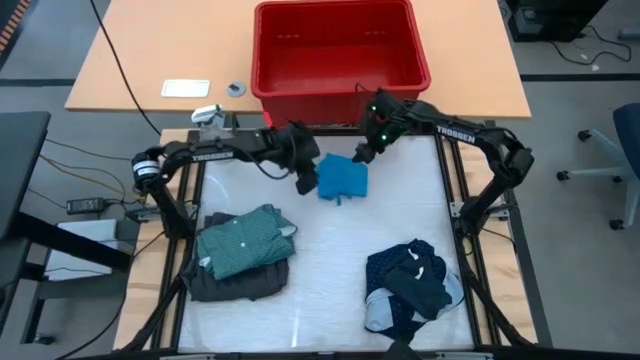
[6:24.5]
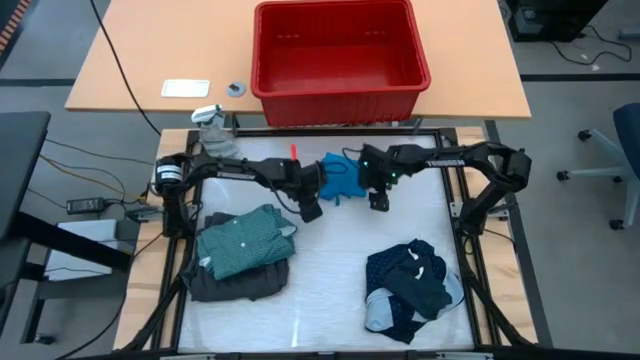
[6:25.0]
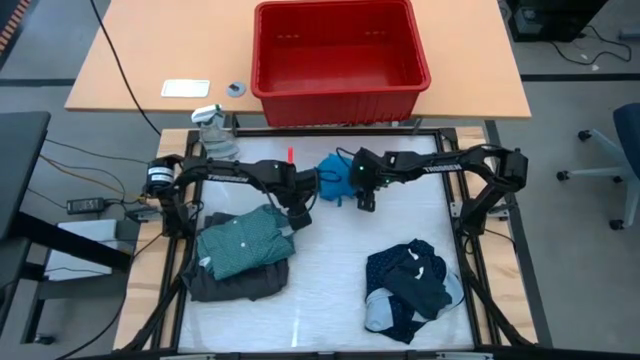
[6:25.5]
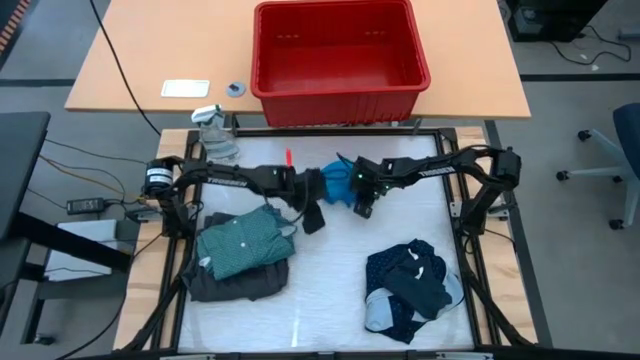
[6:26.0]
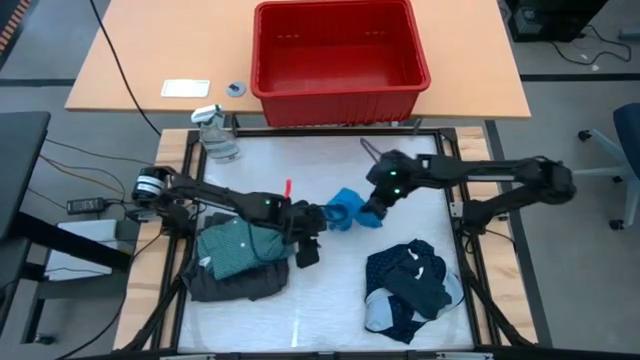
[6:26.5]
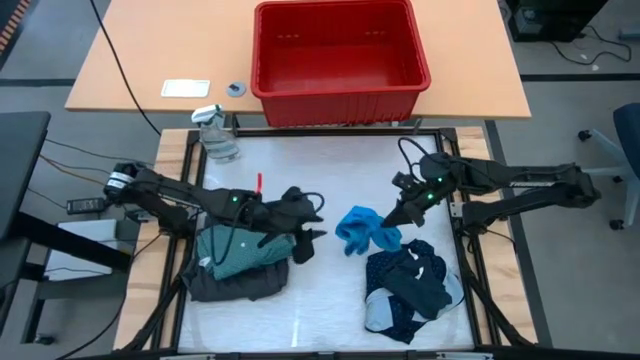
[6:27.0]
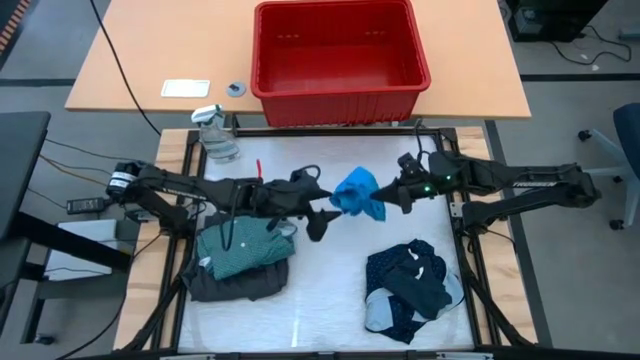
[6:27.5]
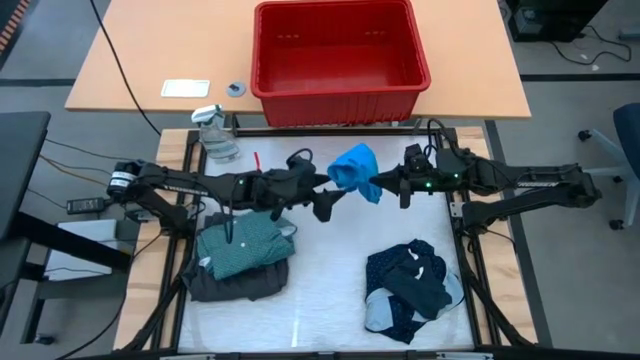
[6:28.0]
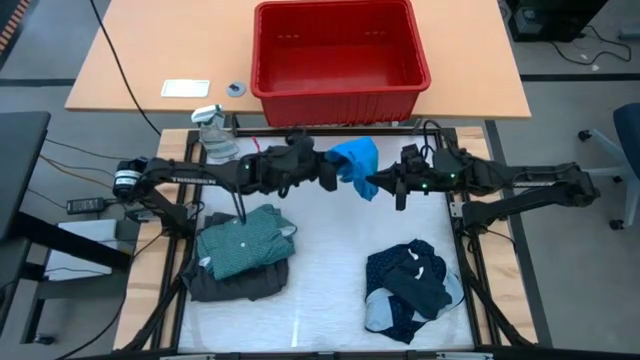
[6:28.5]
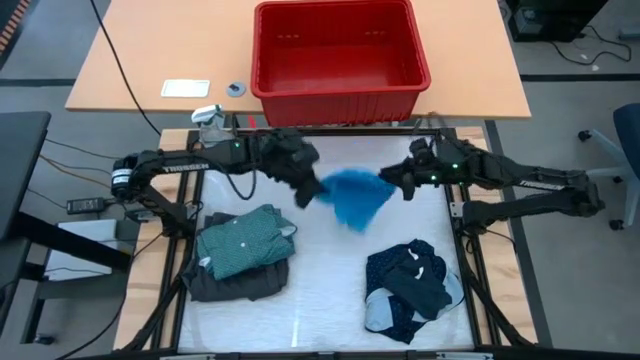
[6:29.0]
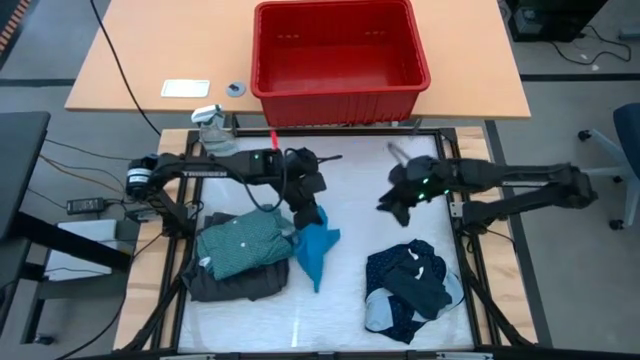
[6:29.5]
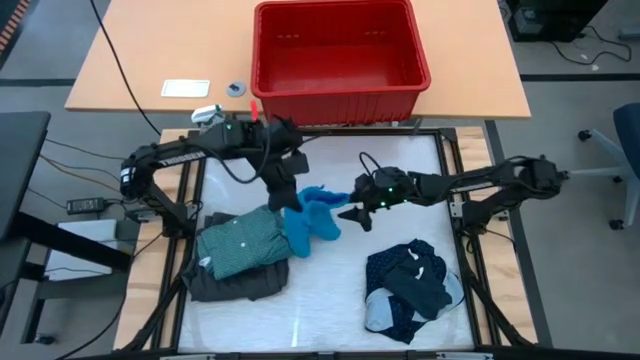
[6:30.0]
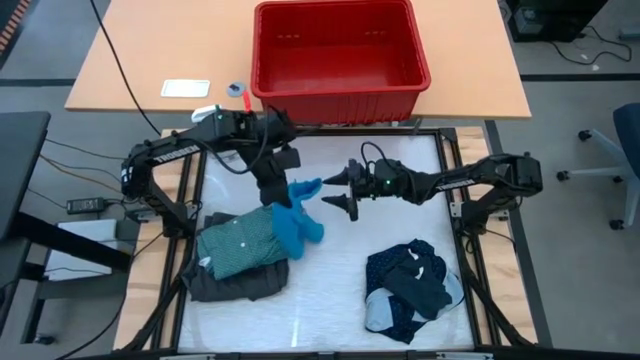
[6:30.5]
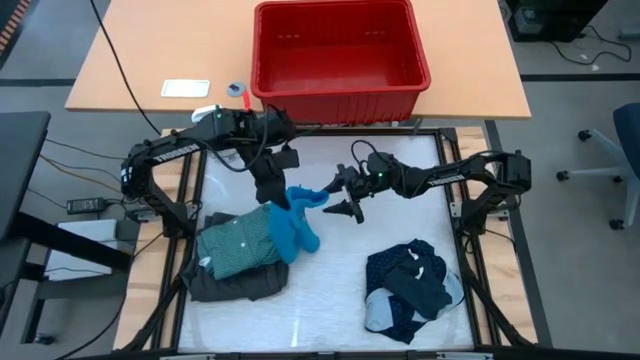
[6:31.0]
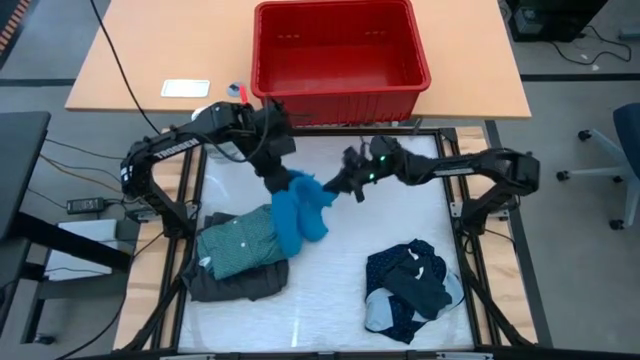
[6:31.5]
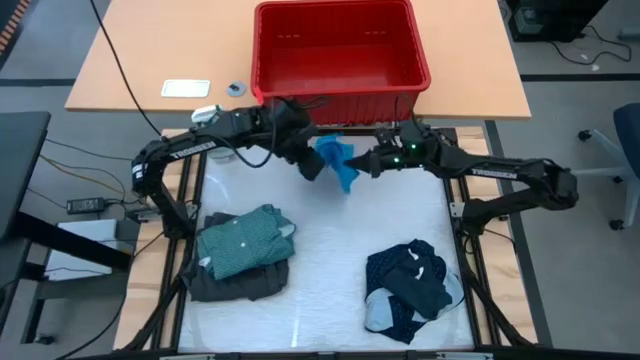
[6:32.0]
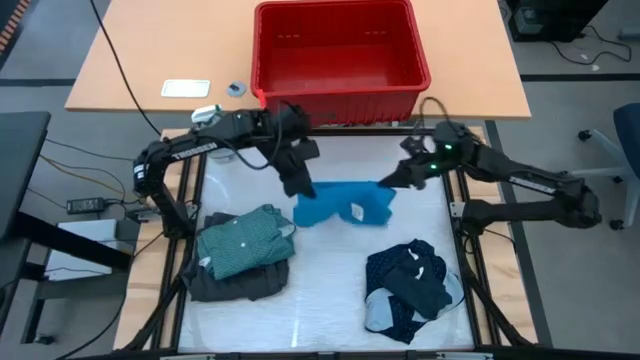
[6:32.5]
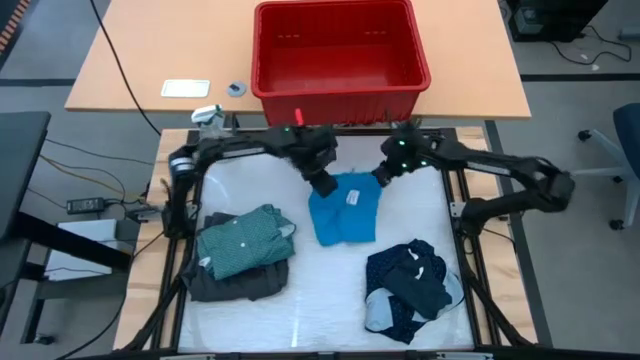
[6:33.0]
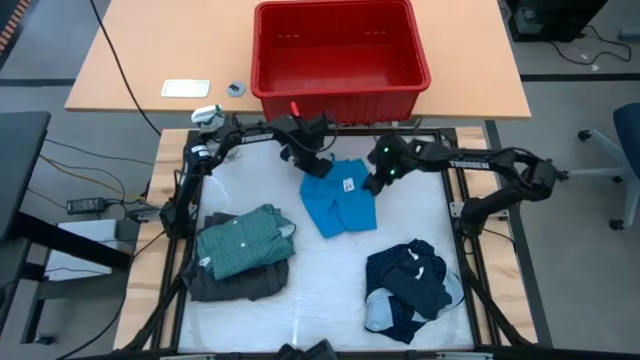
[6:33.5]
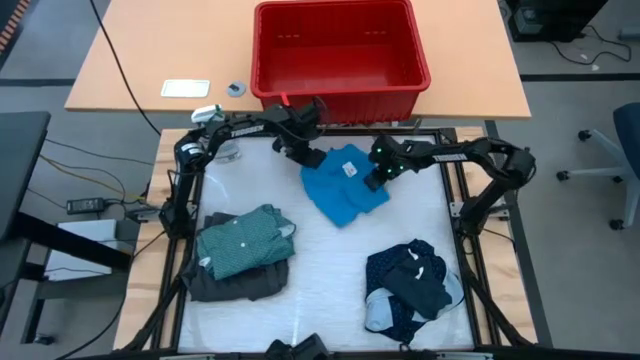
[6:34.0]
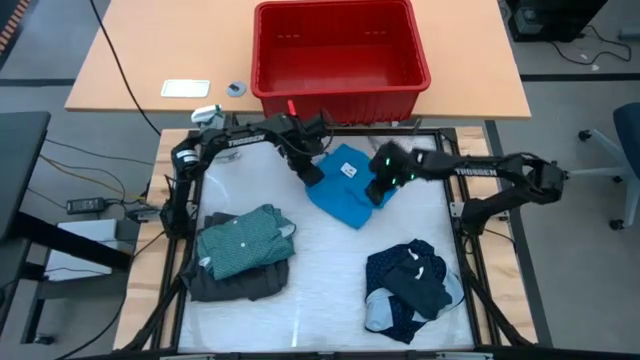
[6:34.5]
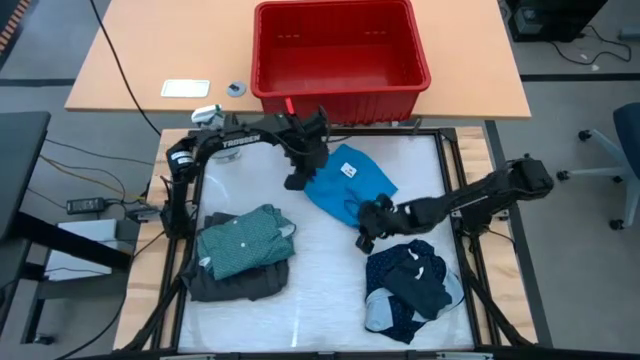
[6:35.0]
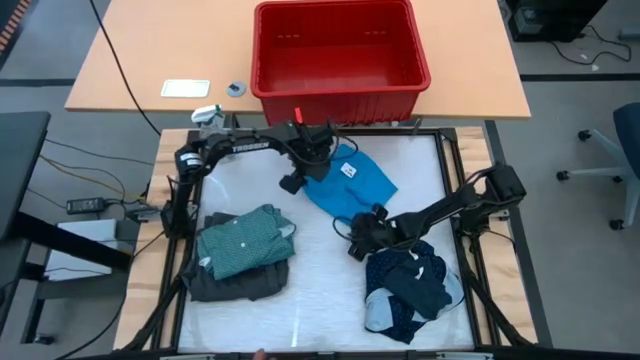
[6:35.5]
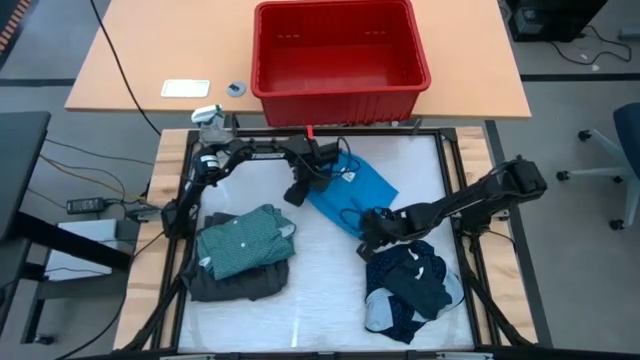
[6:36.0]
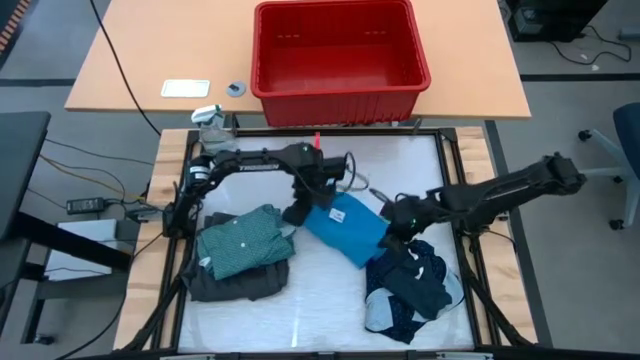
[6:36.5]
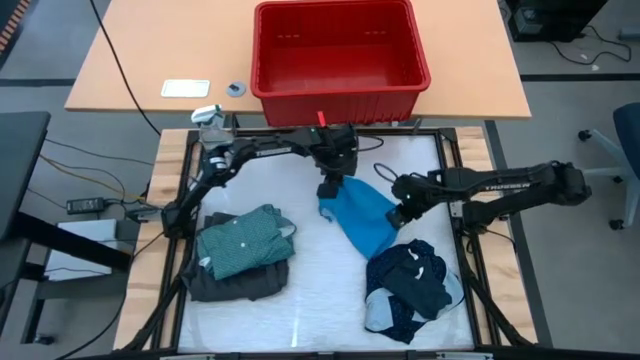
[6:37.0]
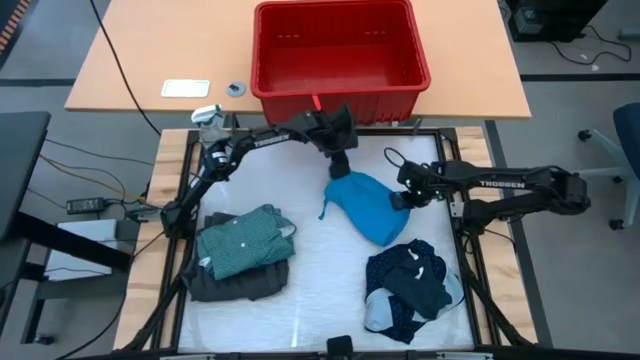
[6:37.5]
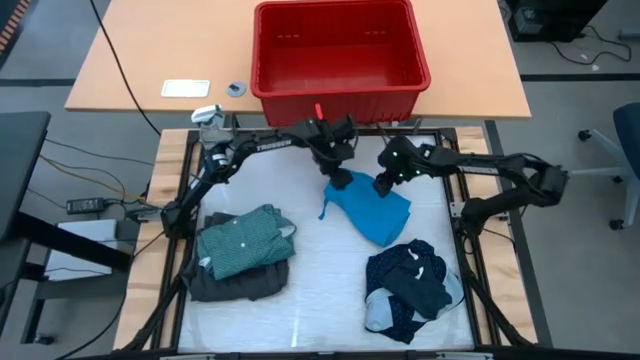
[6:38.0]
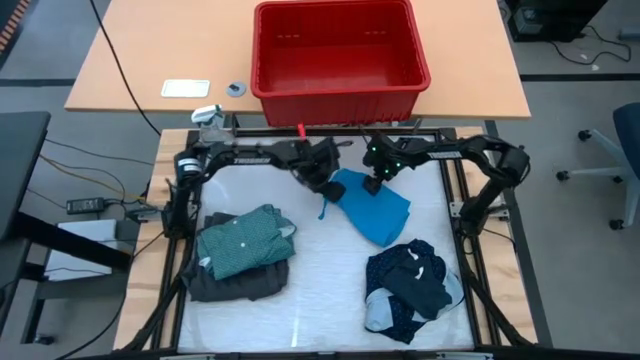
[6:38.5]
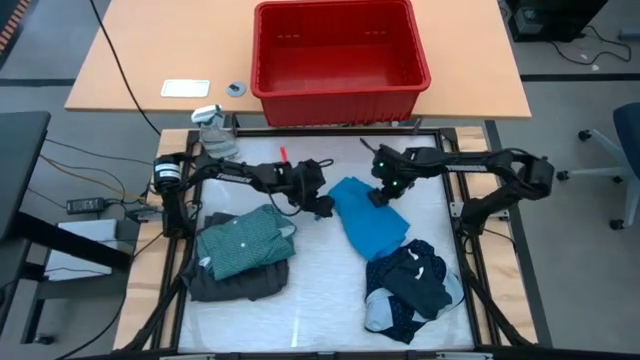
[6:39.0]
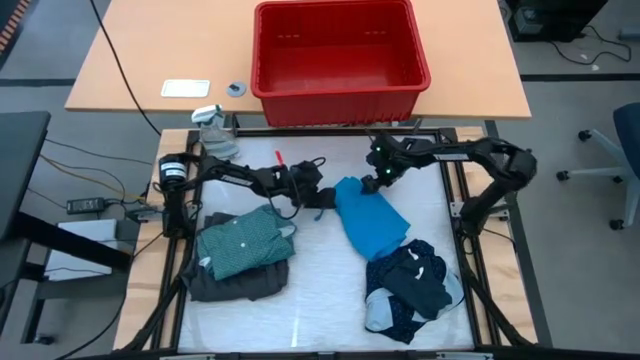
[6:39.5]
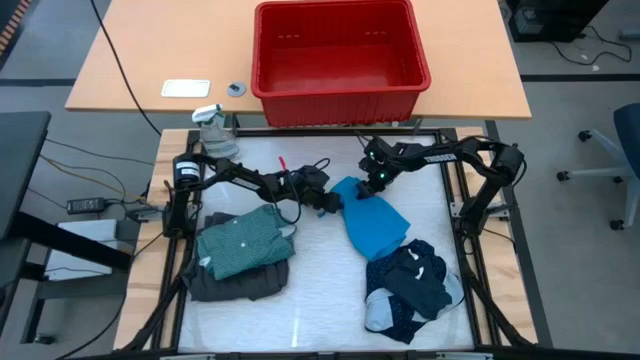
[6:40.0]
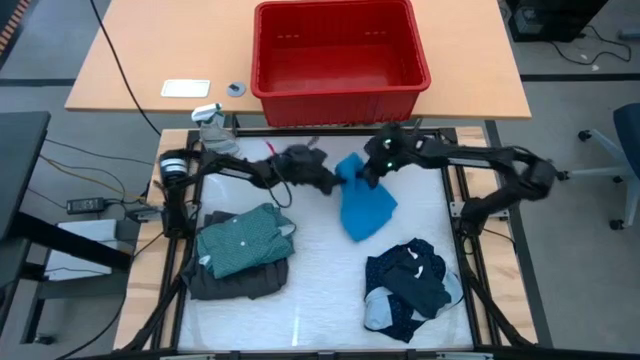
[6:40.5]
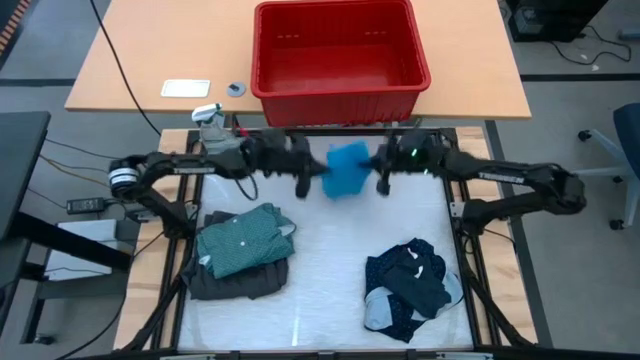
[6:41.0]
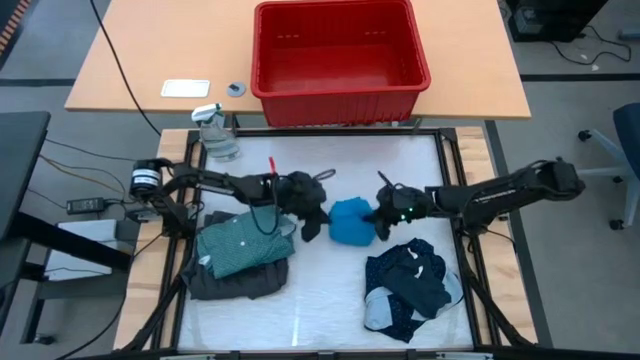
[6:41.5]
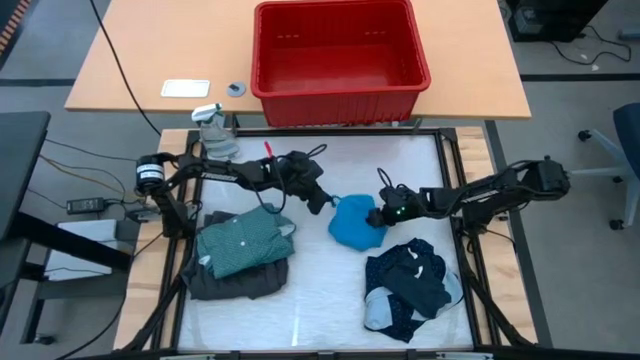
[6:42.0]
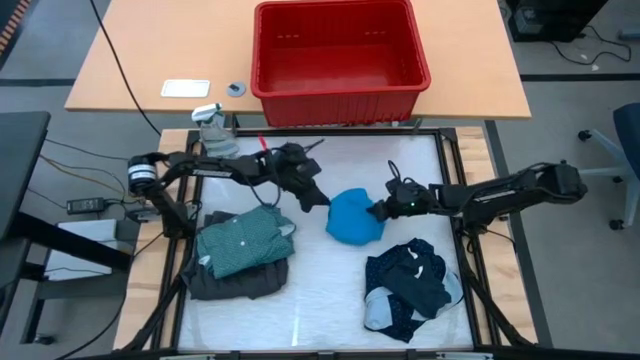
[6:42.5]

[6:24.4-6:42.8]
Task: Fold Laundry from Bin
Fold the blue short on the table

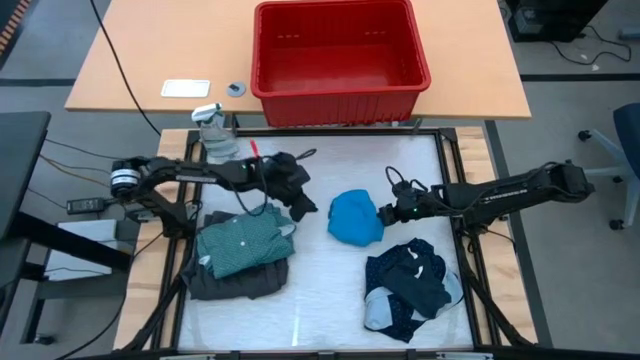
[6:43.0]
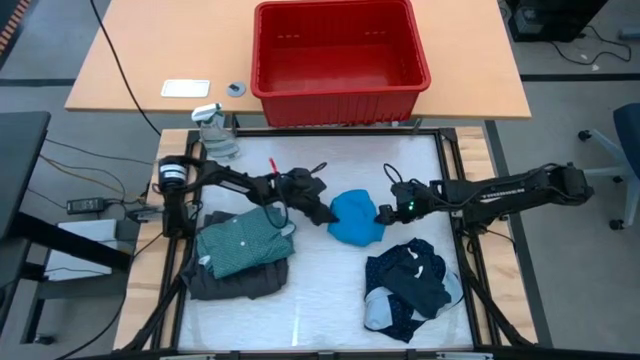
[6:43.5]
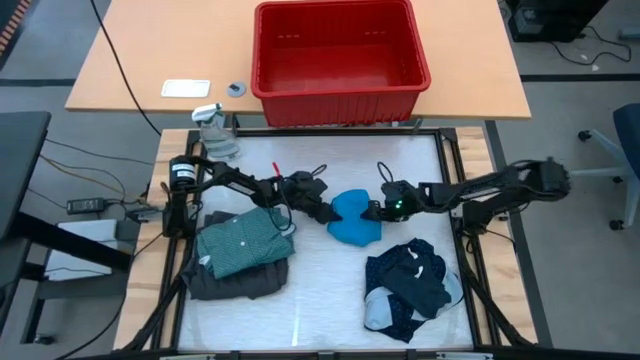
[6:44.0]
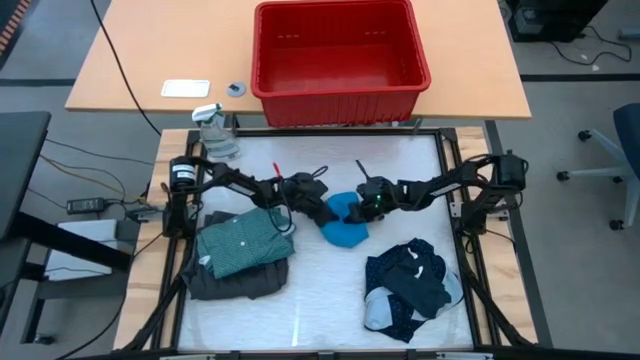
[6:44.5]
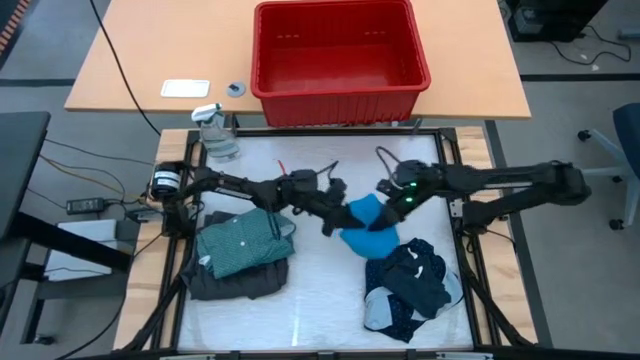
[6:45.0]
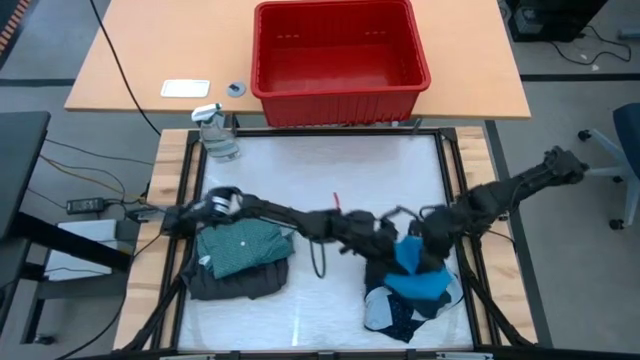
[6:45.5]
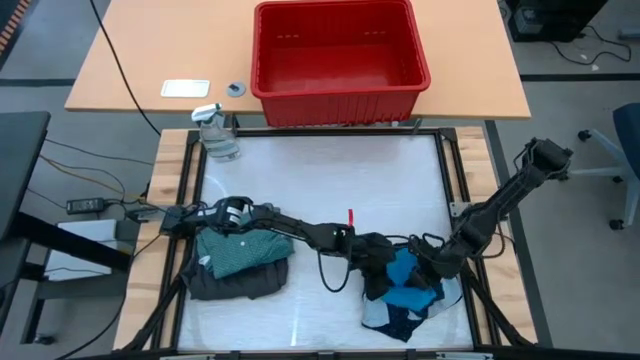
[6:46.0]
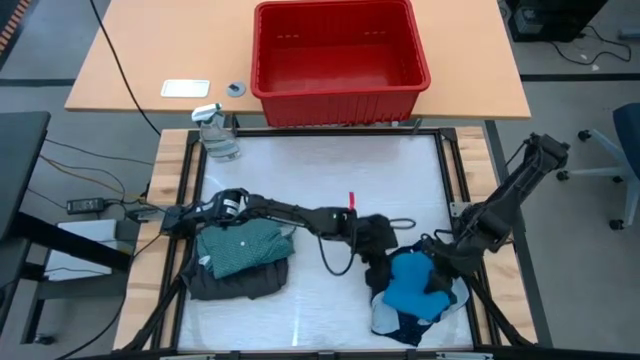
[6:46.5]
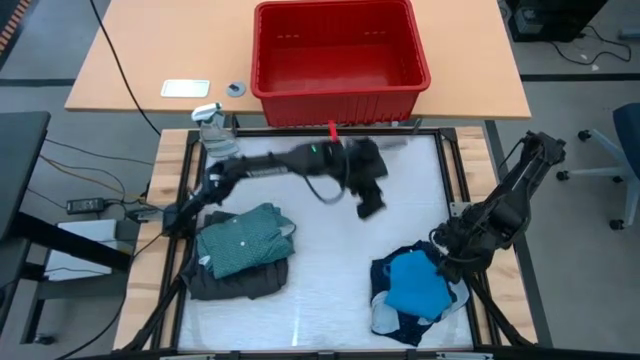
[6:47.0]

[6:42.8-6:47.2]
Stack the blue short on top of the blue short on the table
